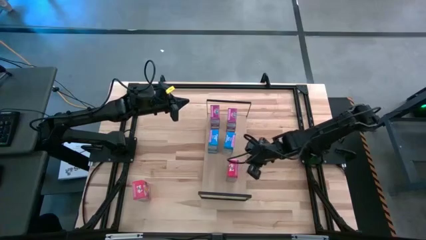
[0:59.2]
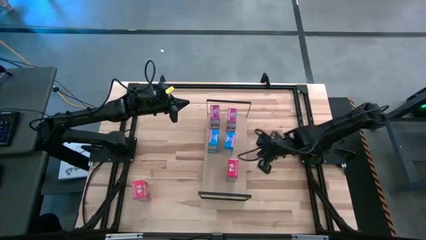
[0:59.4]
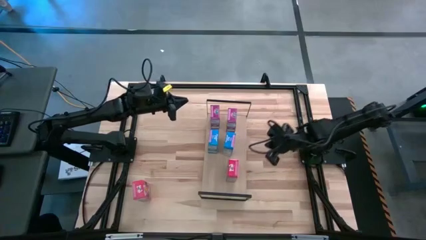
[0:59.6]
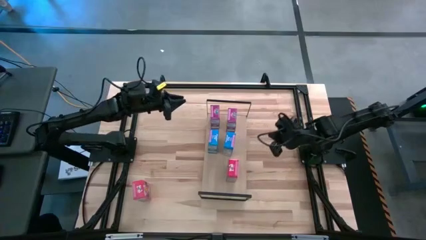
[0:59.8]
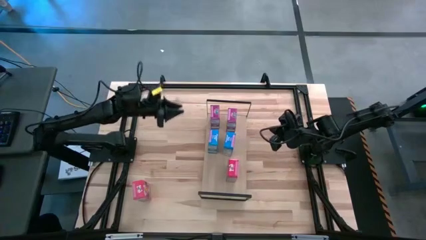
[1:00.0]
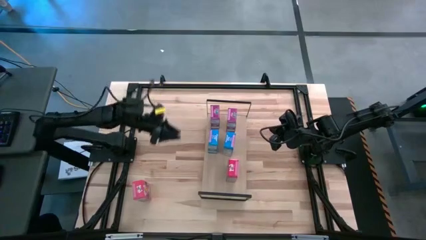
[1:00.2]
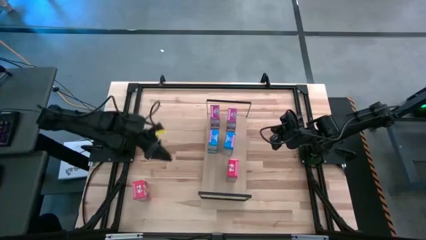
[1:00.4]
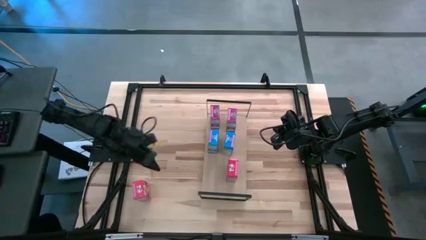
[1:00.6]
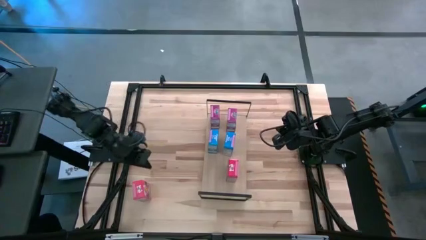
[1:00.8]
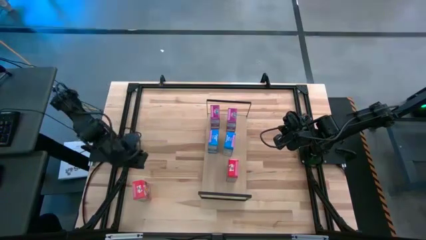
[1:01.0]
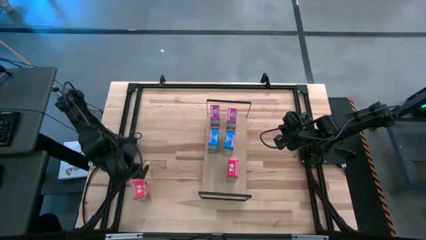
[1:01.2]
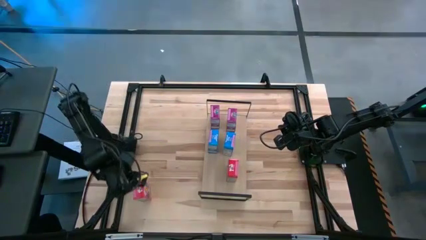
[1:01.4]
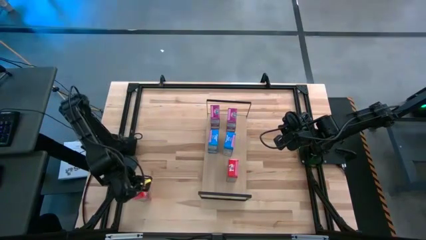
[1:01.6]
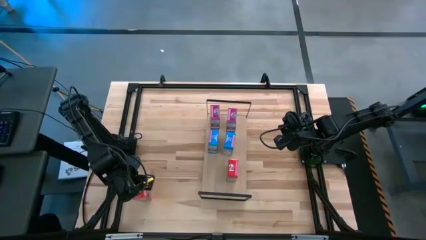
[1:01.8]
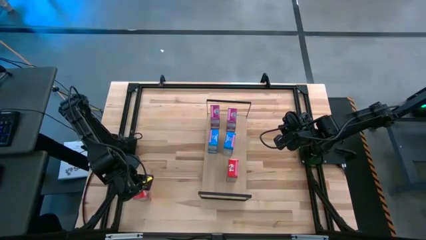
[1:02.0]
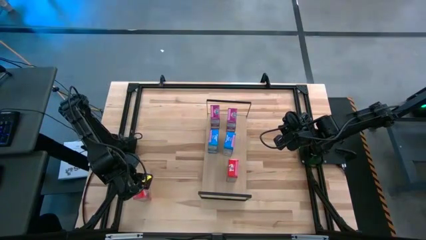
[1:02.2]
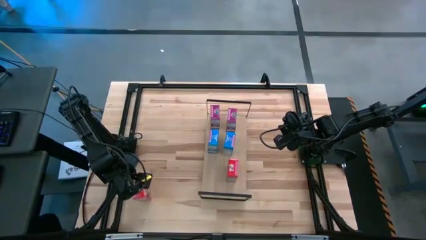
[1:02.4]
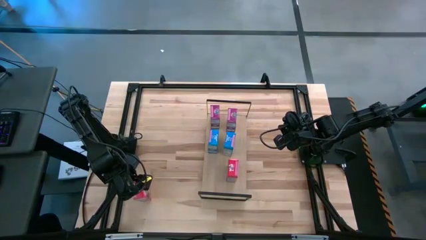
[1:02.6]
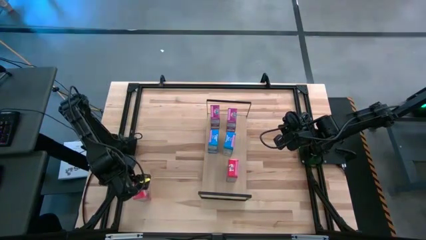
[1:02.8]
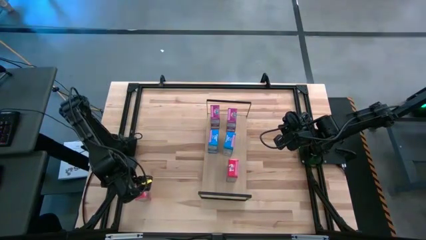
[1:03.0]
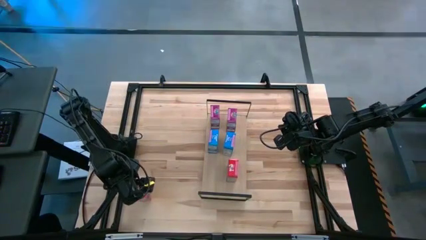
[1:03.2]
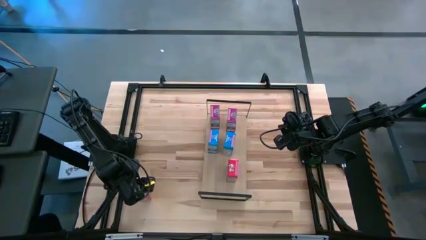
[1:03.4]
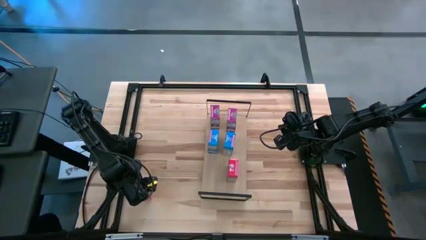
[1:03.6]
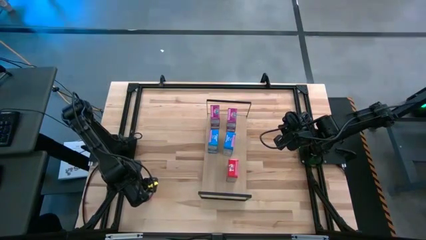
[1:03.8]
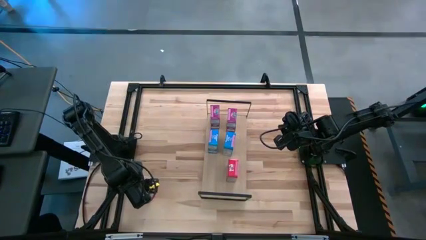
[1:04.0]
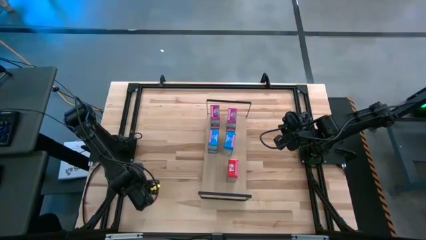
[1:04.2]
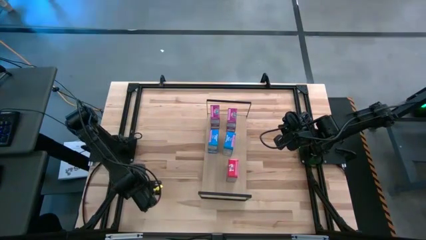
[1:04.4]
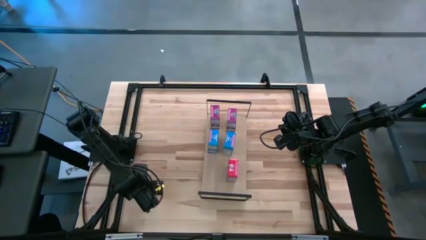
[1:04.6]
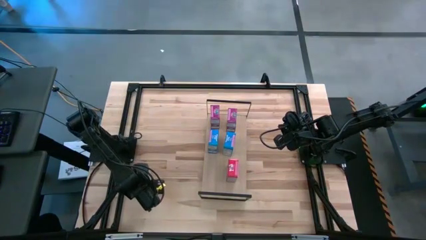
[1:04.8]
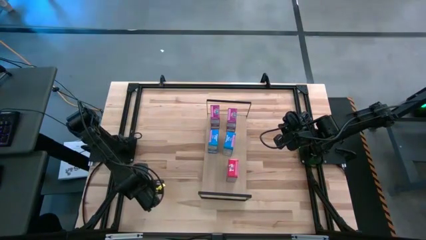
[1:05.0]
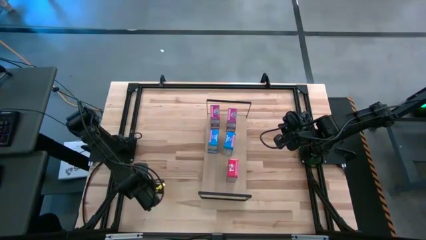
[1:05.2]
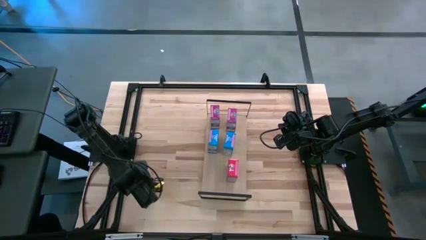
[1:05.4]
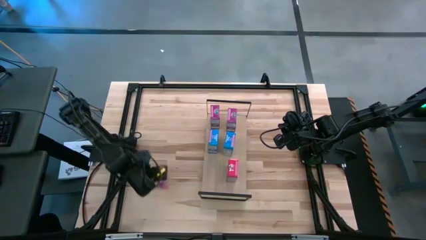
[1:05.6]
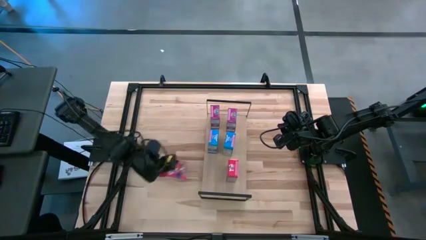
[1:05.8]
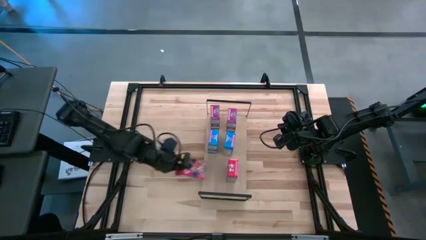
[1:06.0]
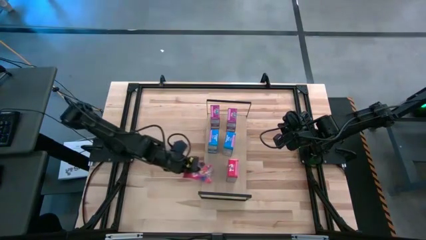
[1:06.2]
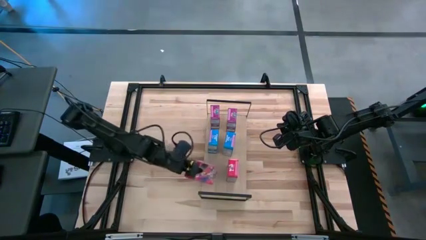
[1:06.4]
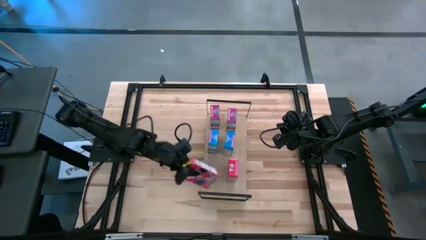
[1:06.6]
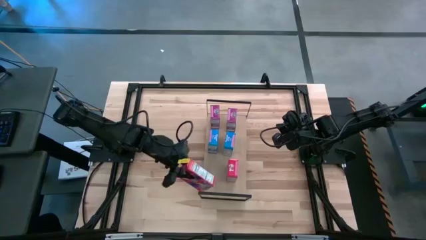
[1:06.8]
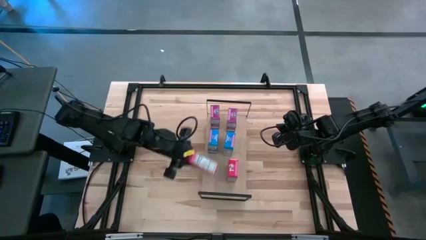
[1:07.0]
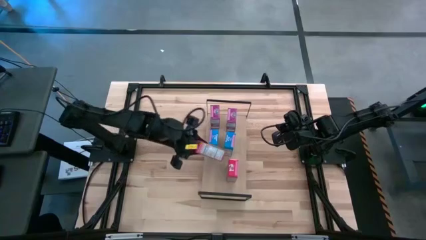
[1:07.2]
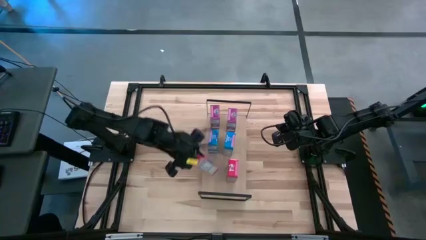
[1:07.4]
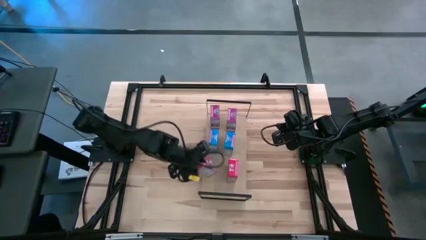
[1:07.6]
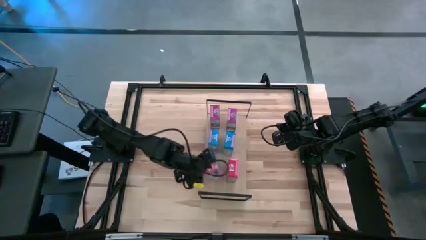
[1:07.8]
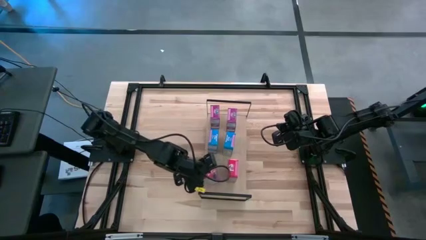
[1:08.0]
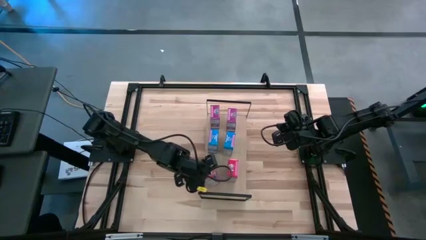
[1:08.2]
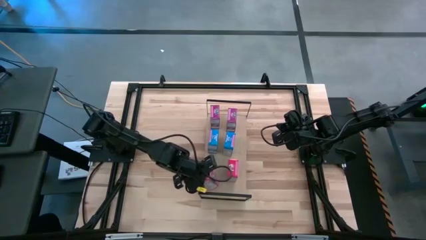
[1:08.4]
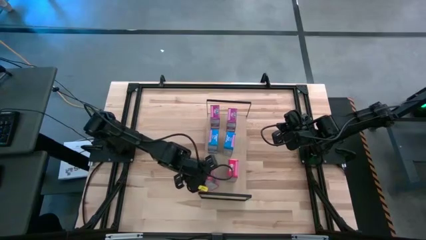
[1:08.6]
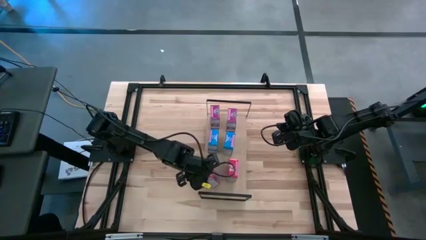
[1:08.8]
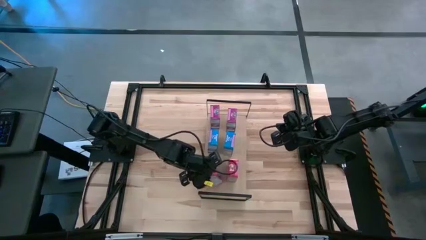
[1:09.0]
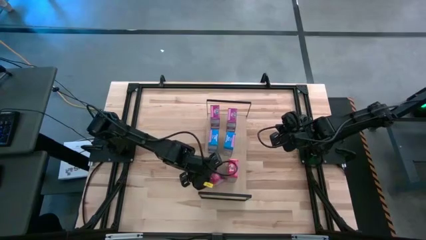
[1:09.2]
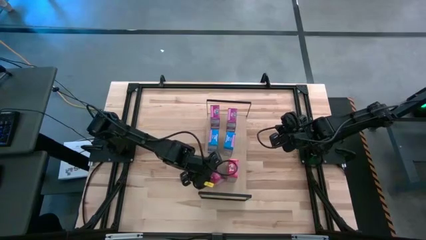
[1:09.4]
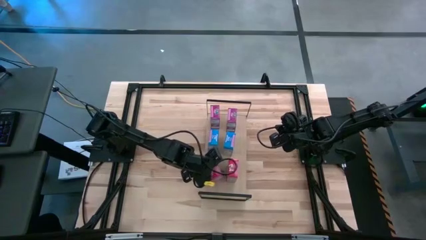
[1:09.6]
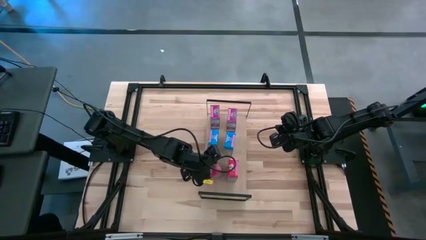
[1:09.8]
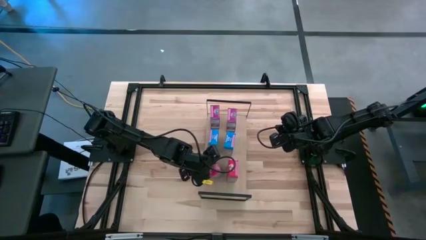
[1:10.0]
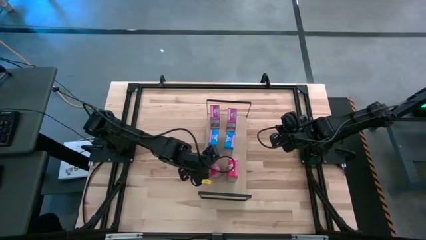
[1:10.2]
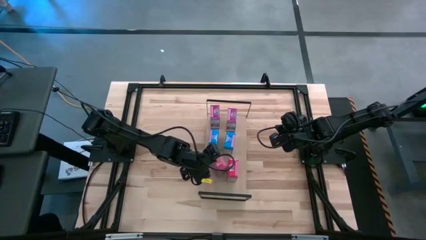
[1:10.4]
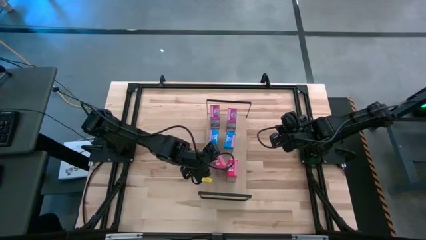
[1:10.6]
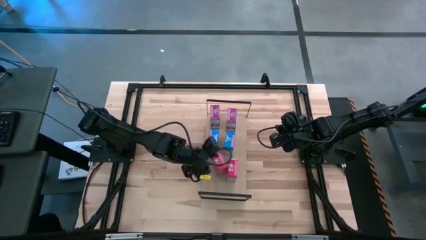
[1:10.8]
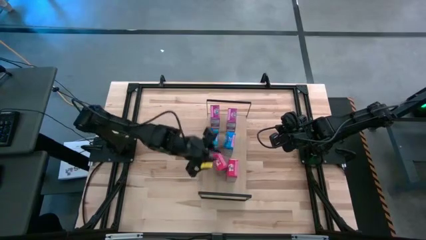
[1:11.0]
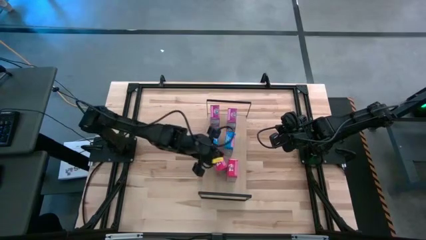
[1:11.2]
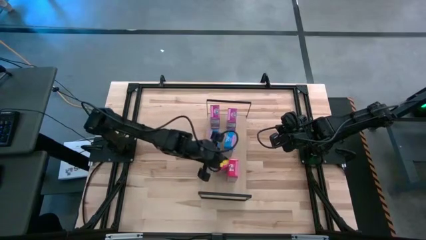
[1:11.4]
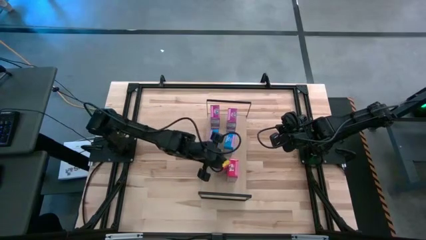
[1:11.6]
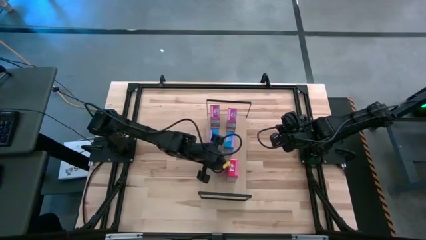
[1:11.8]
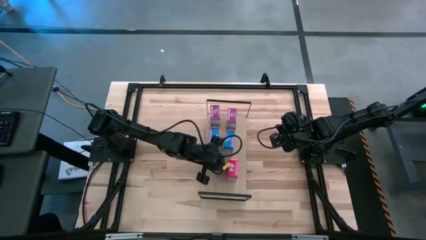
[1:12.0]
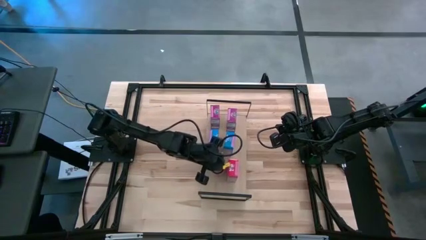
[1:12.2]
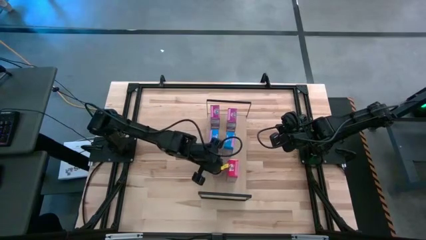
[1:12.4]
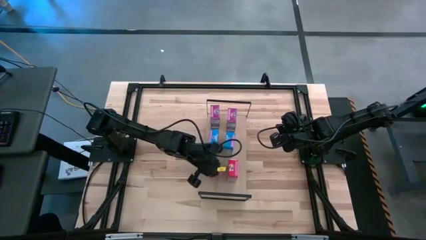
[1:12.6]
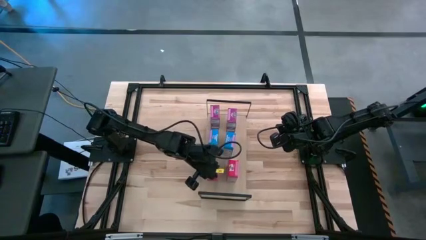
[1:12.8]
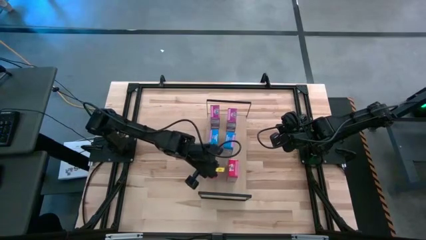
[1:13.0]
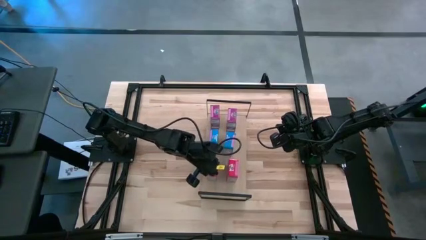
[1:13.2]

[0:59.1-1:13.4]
Task: Stack cereal on shelf
Put the red cereal box on the shelf aligned with the other red cereal box

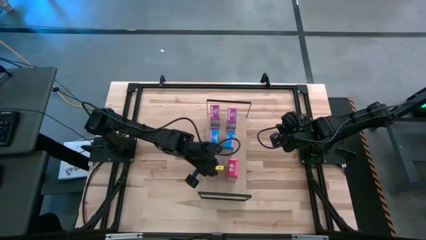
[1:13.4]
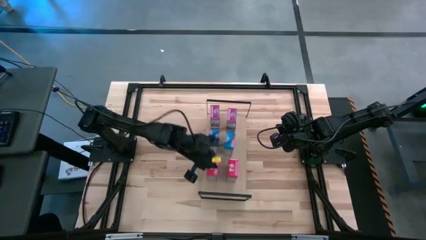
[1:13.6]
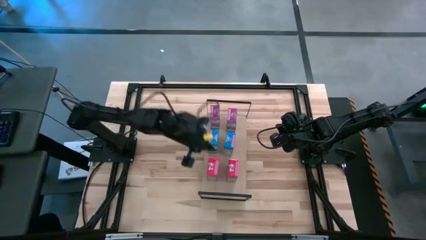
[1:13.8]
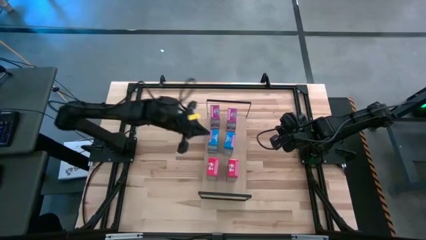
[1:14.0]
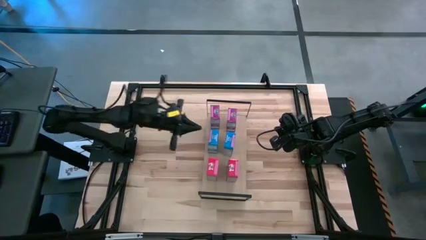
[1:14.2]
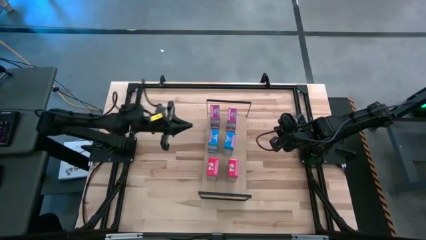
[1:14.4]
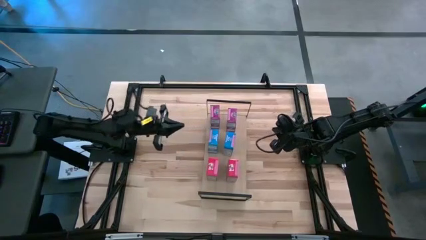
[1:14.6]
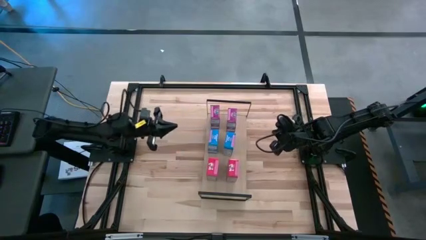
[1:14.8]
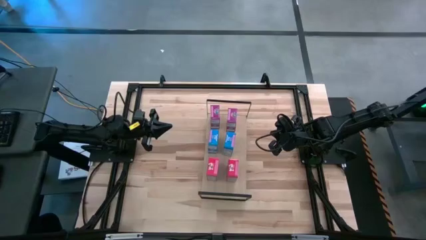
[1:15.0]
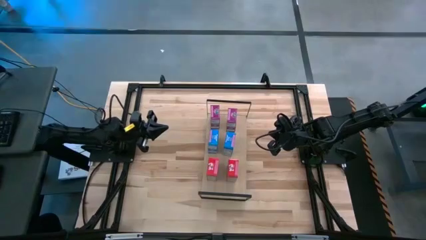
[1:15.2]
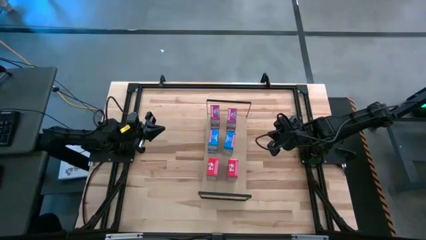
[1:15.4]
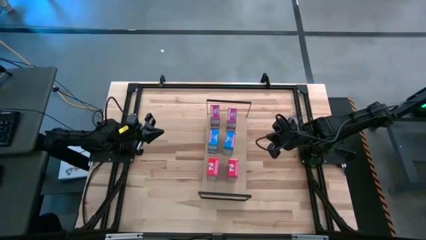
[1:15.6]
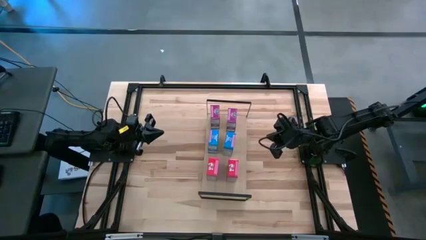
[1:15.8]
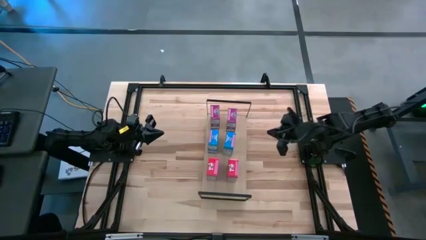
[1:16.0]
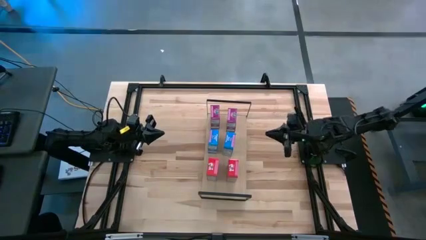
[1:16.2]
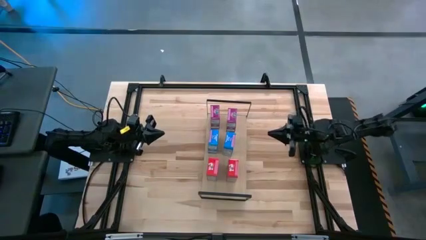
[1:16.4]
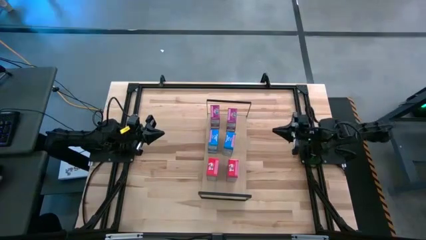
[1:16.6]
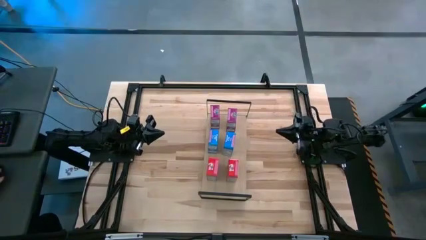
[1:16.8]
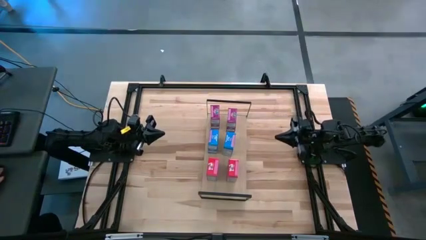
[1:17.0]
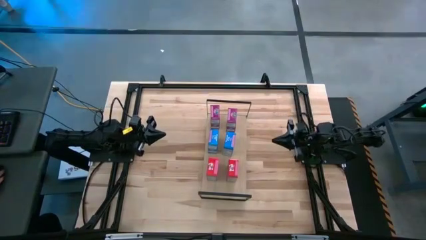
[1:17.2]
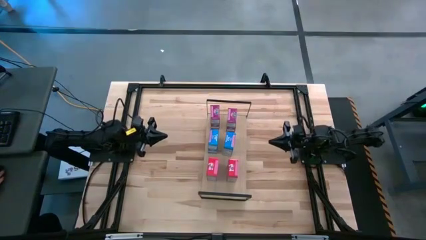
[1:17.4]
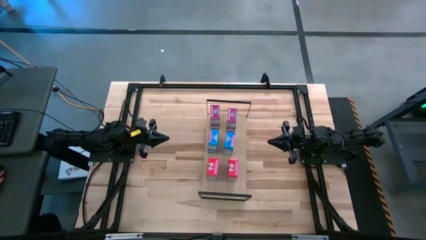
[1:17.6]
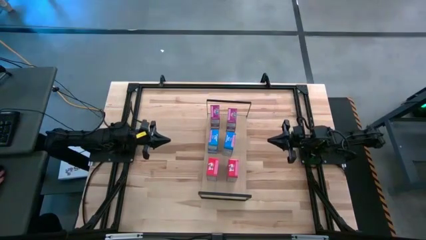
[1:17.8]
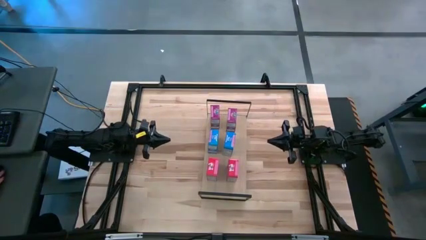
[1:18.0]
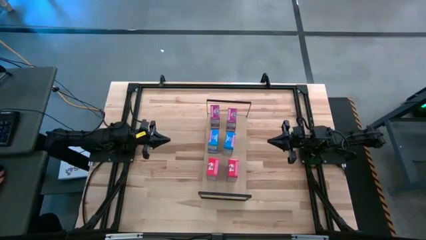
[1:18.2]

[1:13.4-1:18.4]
Return to Home Position
